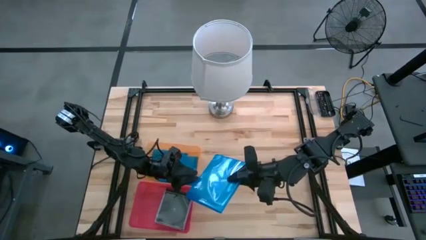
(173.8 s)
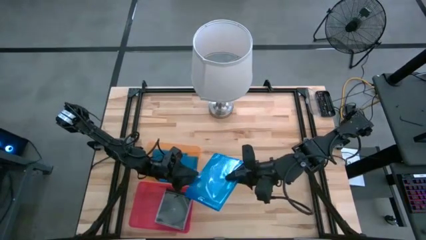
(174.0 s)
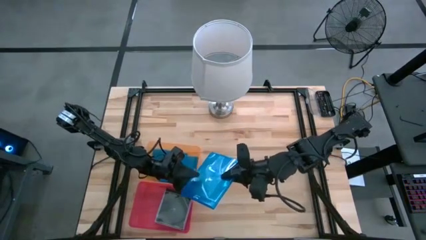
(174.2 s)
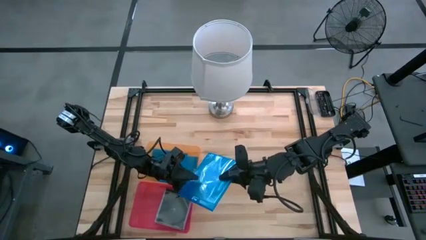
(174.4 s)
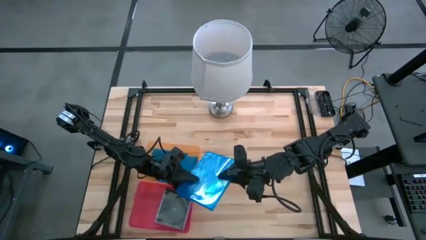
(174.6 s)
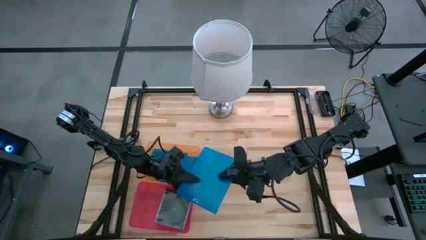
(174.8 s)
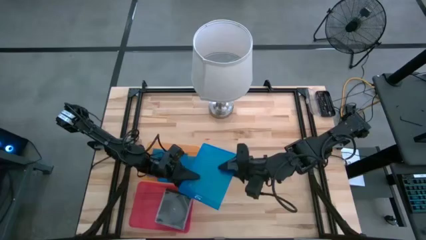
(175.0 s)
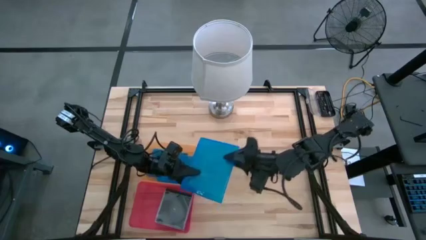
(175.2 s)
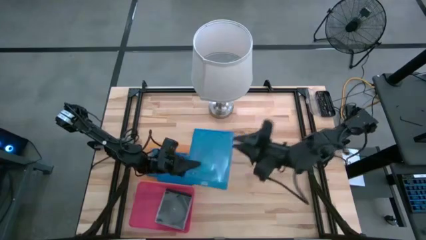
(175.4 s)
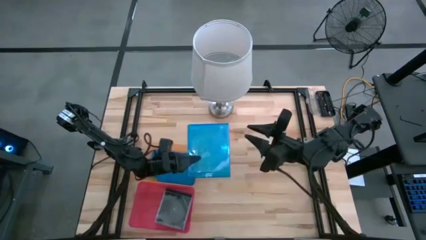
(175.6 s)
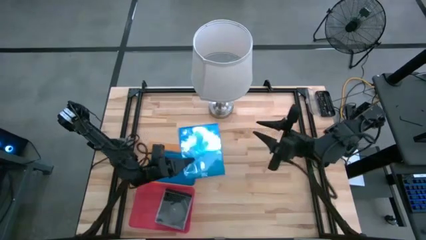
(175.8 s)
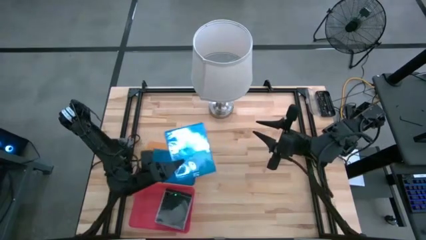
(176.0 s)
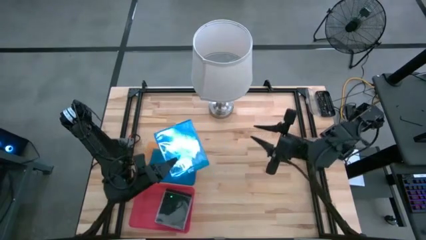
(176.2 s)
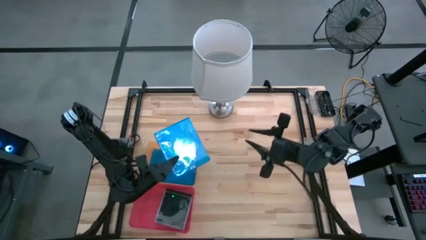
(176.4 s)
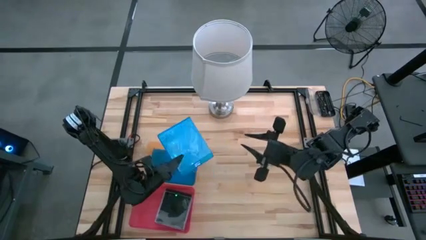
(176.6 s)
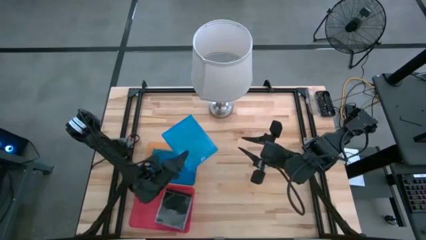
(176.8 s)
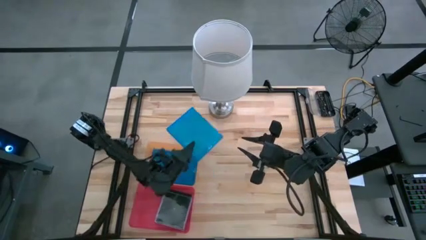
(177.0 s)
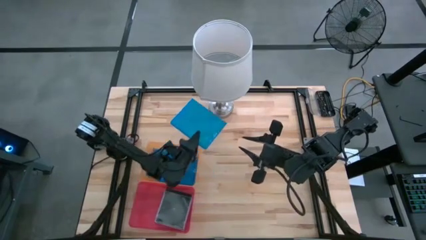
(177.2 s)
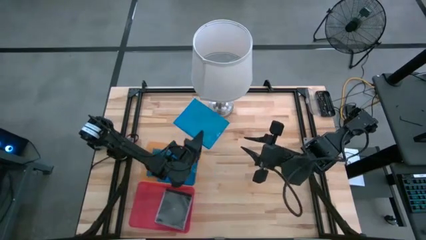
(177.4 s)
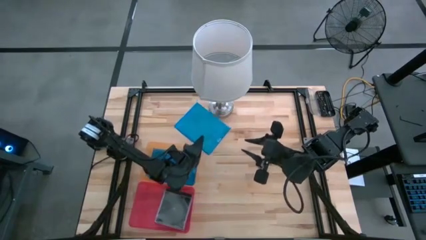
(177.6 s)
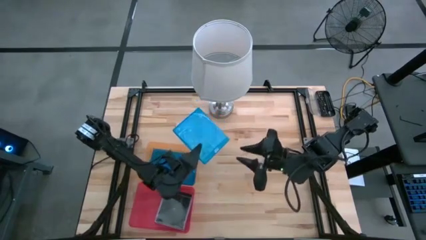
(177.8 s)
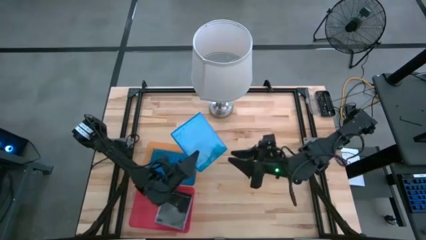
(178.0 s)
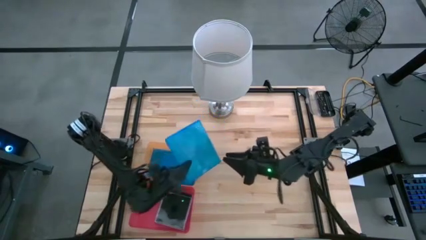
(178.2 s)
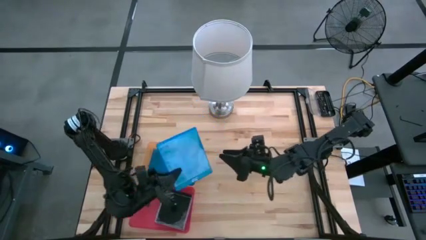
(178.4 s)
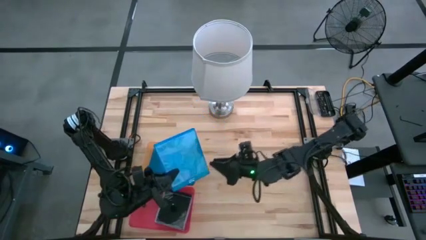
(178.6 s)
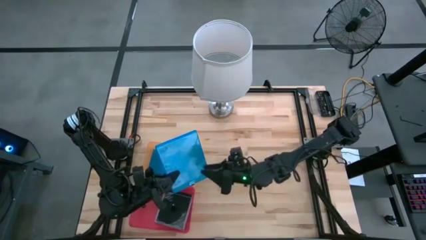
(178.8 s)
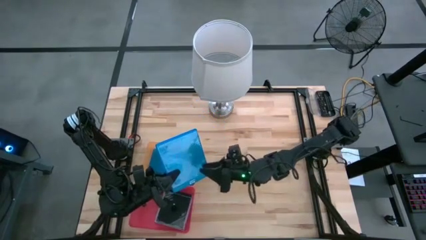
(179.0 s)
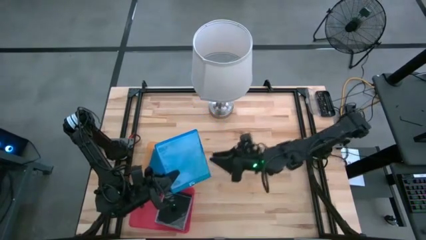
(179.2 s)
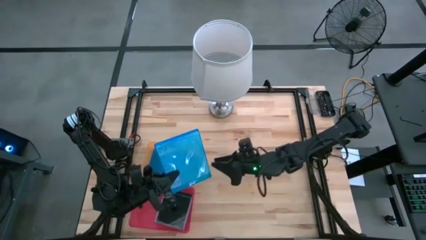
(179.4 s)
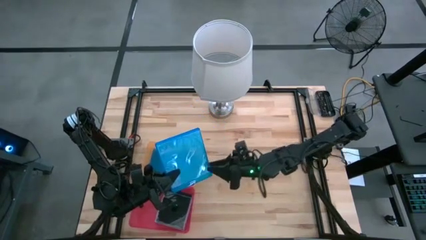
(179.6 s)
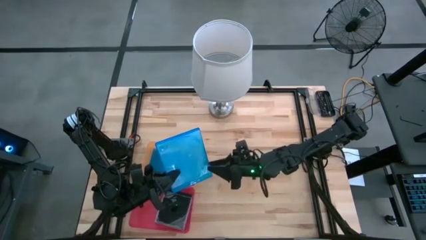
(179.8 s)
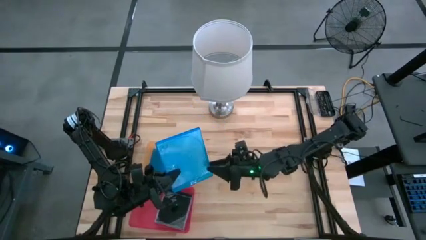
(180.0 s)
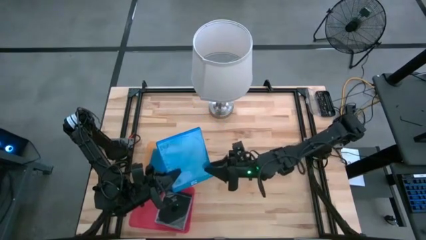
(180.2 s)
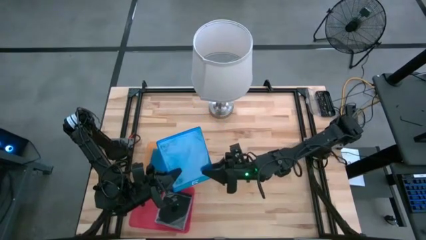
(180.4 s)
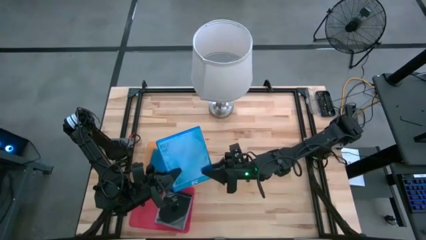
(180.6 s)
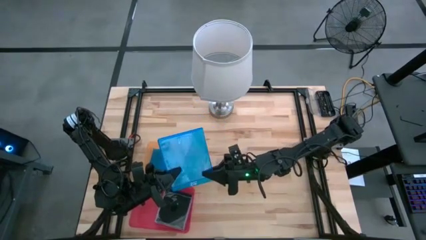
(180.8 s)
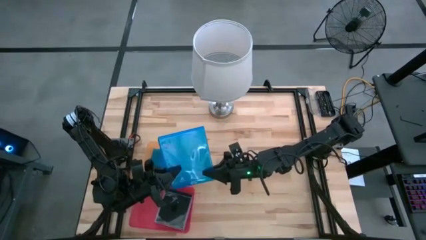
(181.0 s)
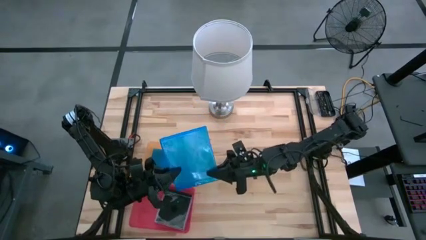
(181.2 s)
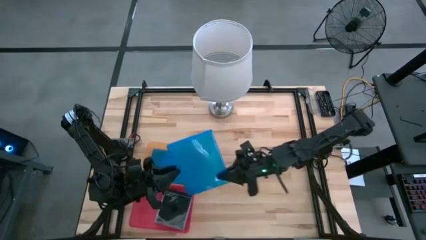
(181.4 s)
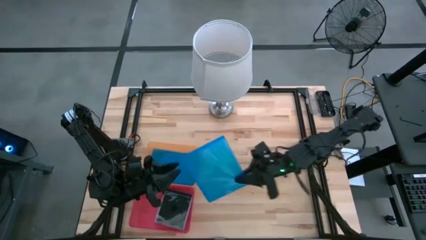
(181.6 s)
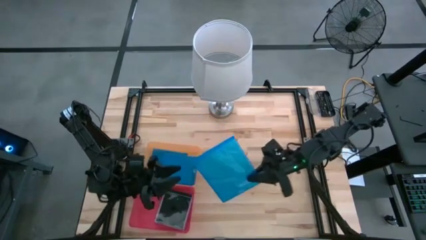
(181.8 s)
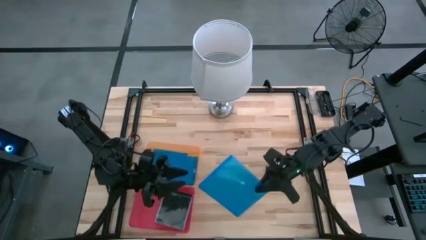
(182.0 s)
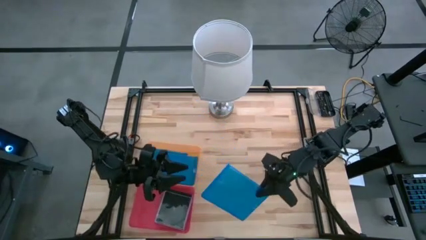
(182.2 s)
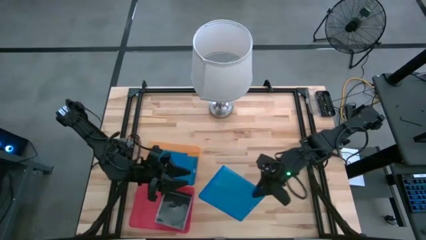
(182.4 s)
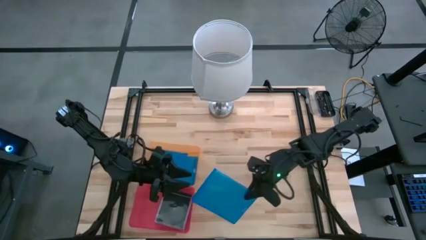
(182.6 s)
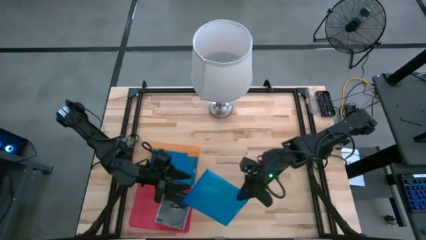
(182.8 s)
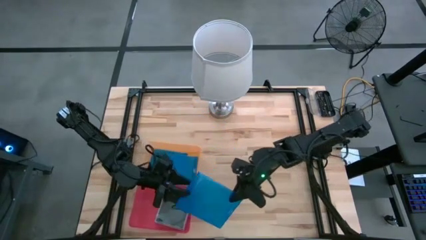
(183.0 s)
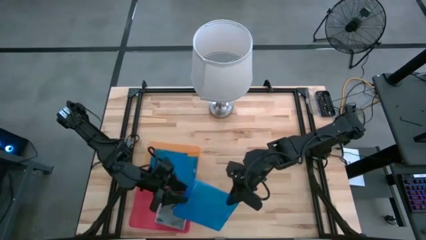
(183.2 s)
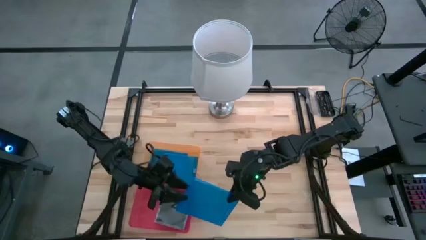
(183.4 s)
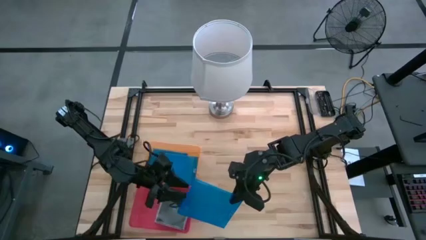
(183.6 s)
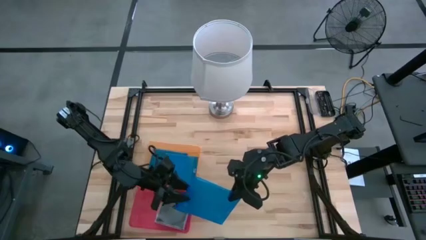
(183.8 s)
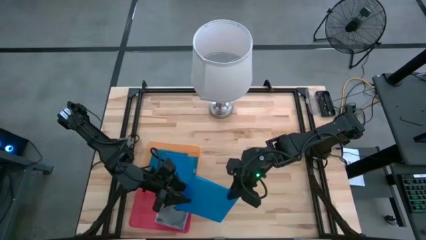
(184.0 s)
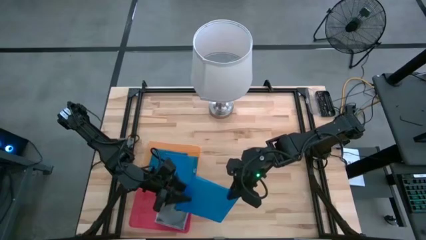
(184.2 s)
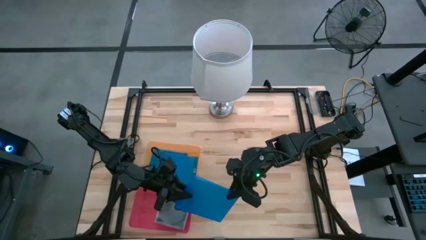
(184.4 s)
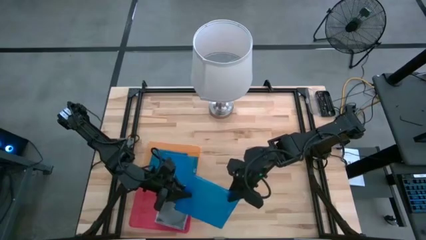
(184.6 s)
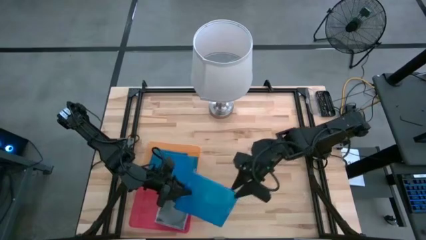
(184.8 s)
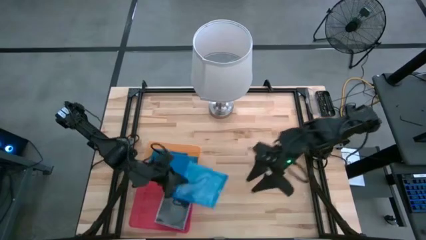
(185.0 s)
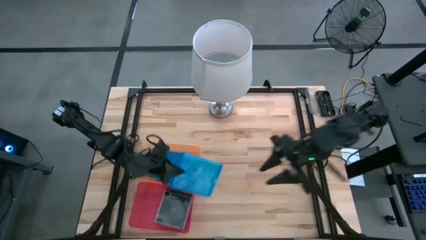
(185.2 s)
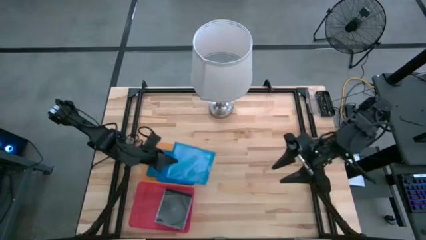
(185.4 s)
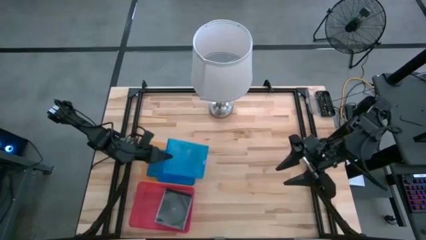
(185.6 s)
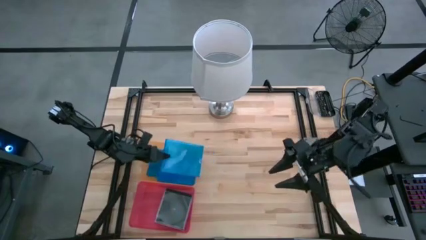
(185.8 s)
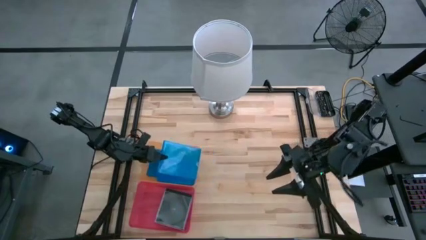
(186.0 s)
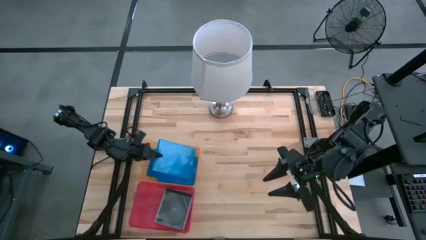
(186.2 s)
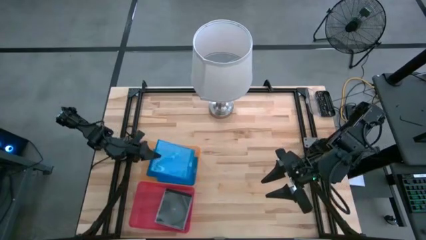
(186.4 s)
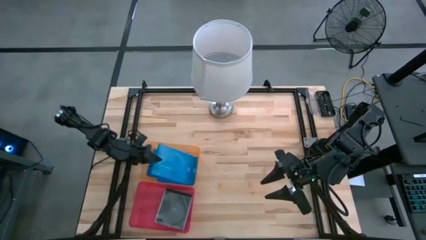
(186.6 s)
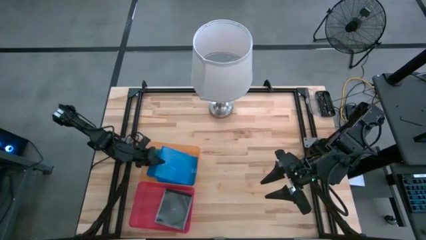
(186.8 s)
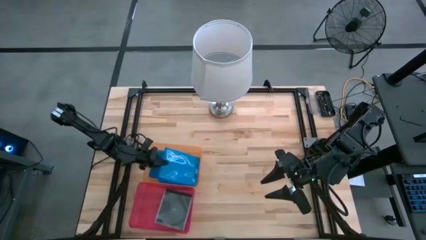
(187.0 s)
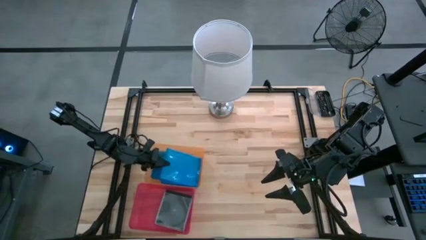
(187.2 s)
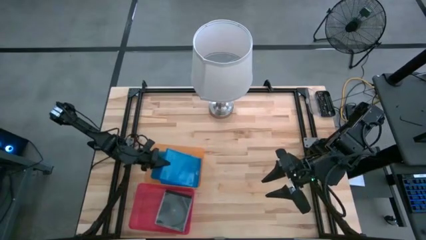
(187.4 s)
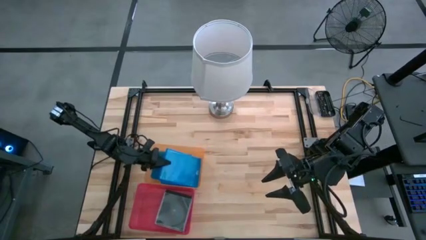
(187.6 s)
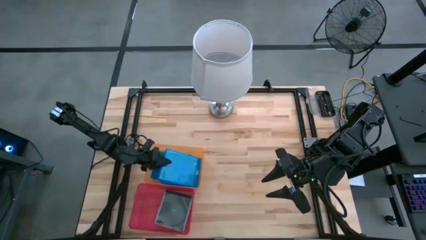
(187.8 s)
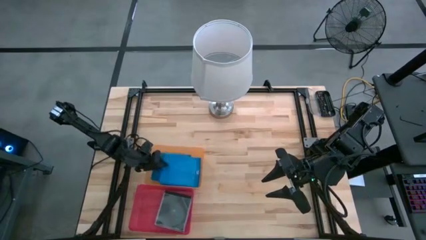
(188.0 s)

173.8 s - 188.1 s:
Task: Pick & place jewel cases by type
Put the blue CD case into the orange bin

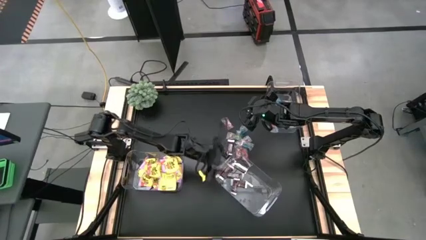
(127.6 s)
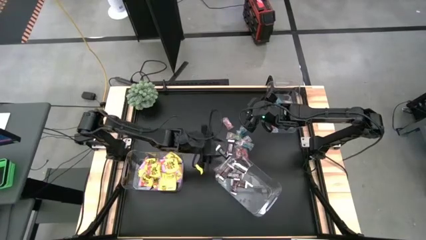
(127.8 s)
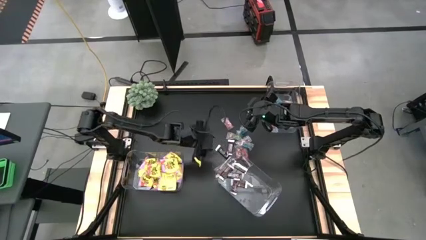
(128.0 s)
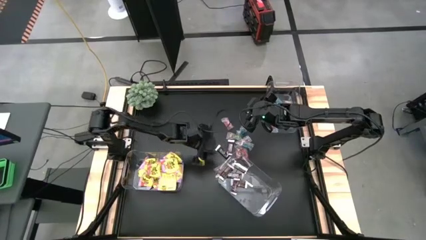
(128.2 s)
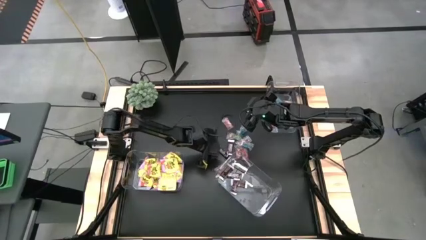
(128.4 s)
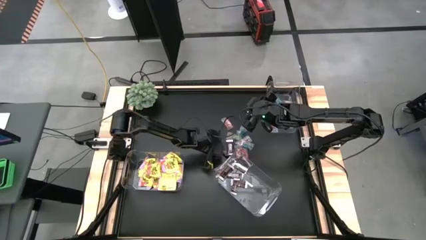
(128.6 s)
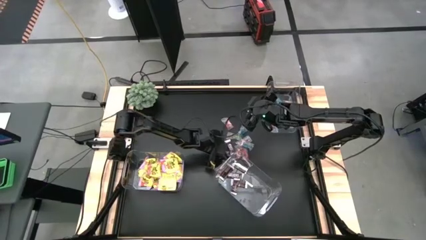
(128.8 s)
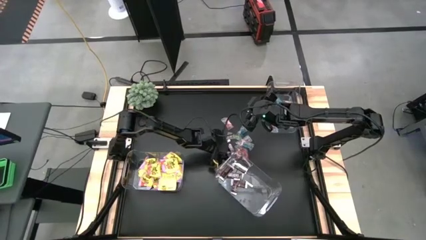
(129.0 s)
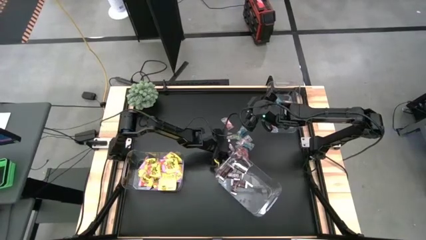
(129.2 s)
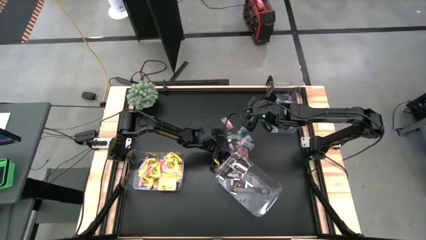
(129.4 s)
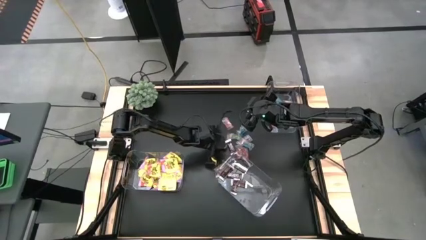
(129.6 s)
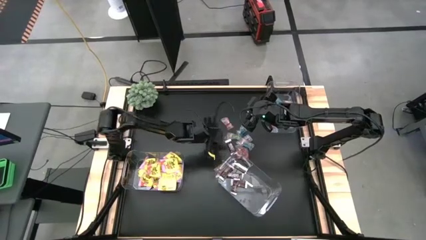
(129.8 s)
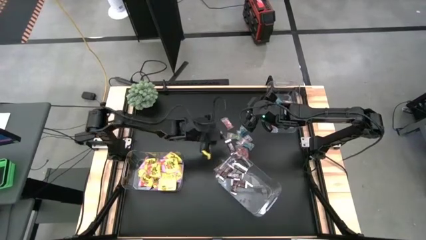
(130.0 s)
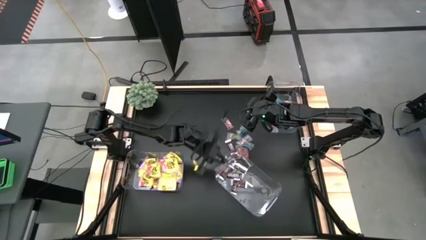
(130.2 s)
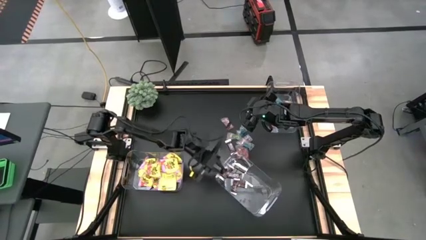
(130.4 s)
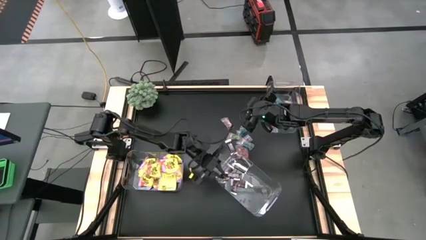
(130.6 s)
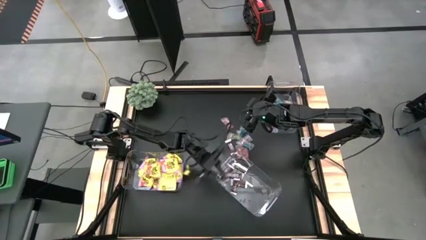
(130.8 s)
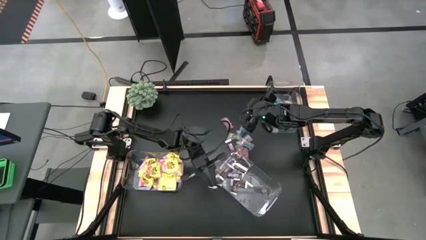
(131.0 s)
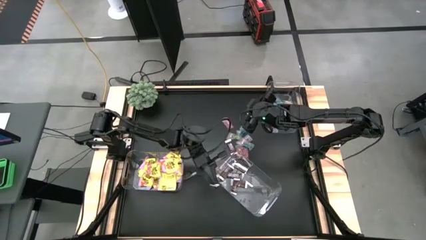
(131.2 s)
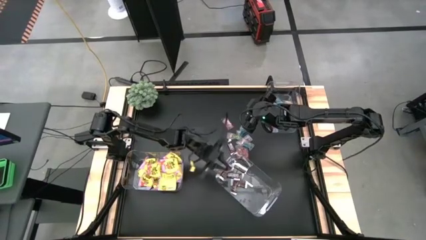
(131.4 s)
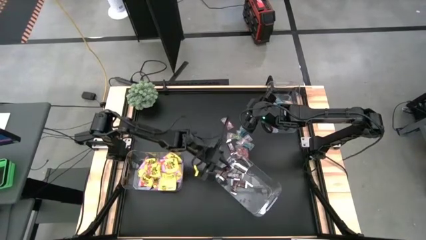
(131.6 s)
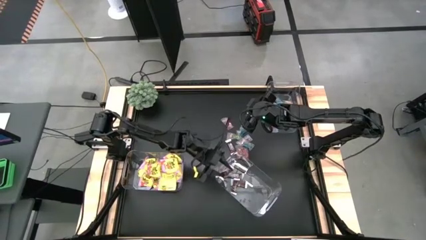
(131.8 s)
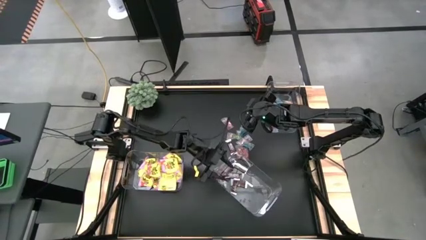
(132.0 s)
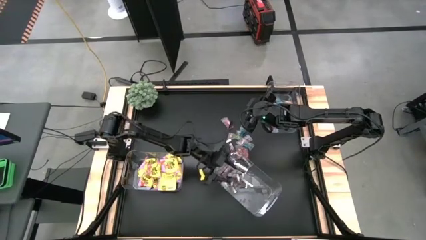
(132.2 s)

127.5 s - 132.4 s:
Task: Sort candy
Put the brown candy in the bottom right transparent container
